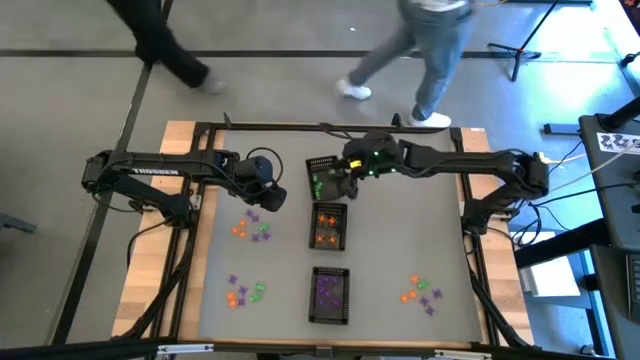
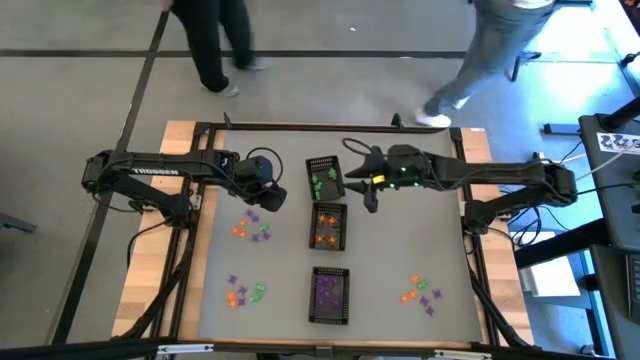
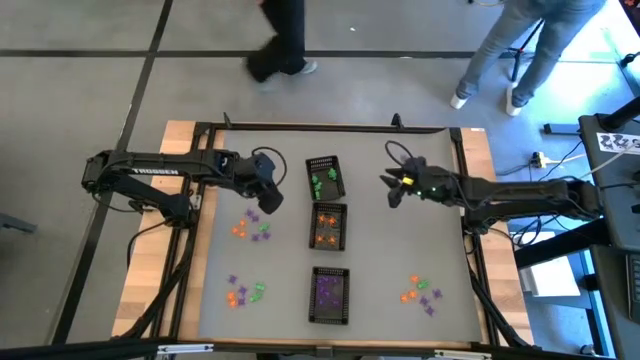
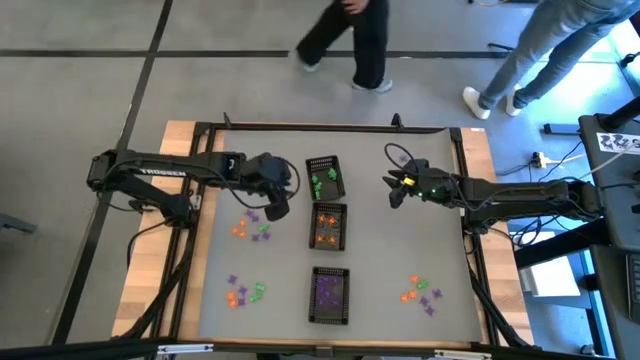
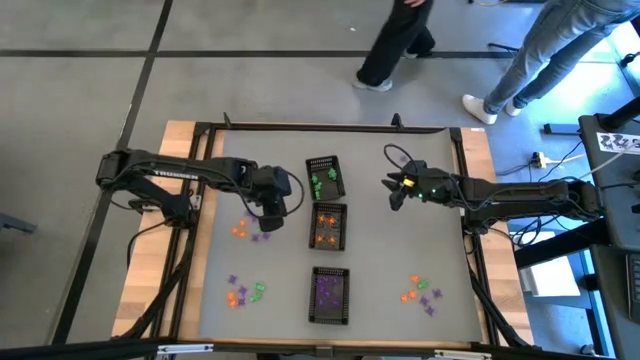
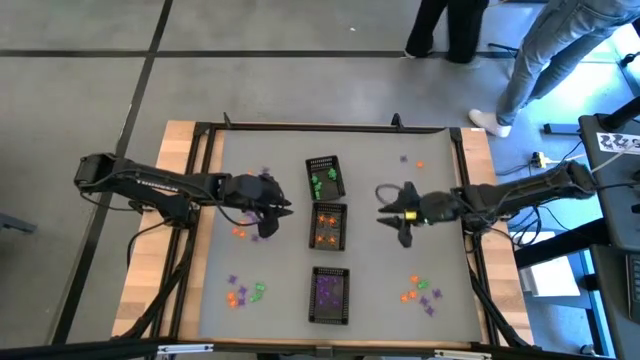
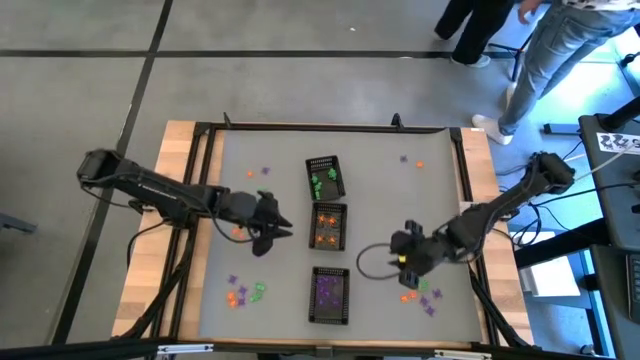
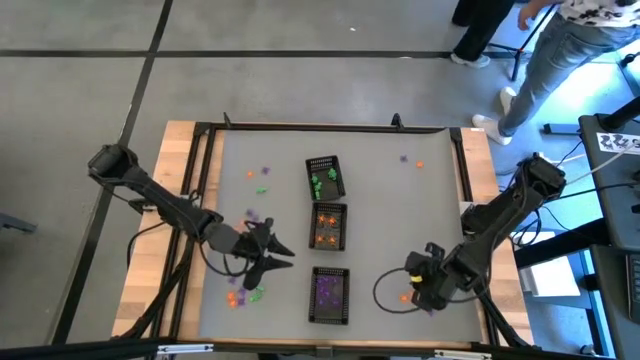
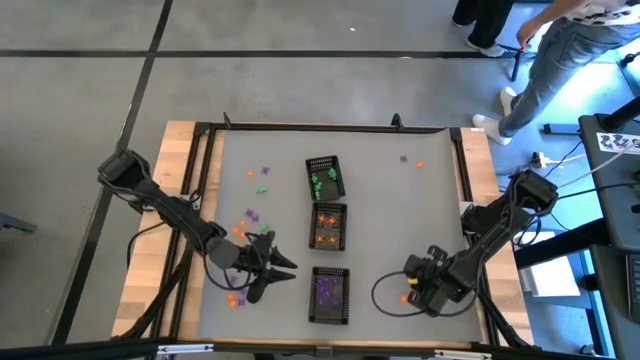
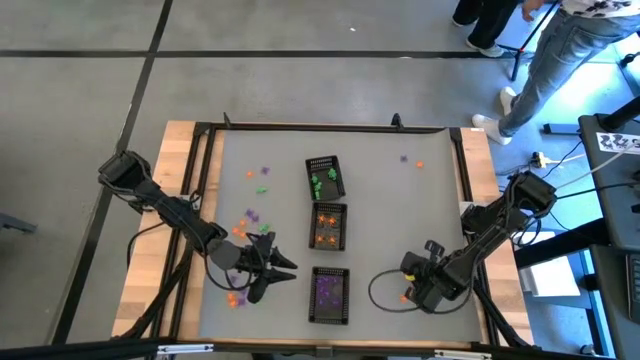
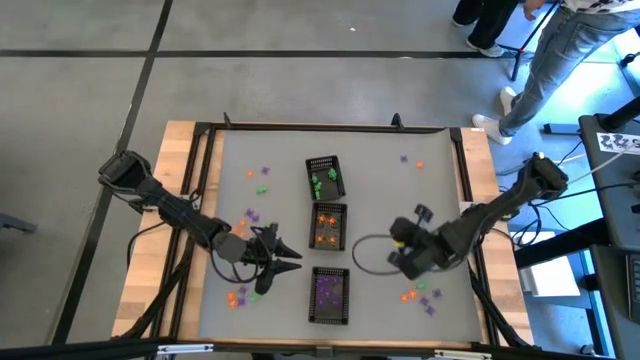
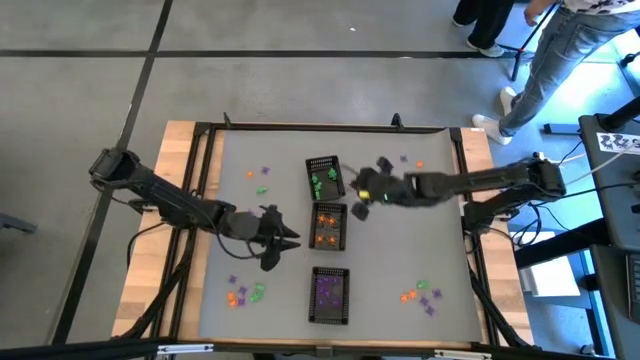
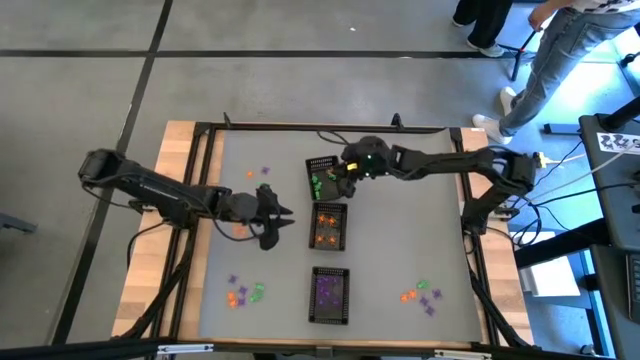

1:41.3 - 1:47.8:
Task: Sort Halloween decoration
Put the orange spider toy into the middle black bin

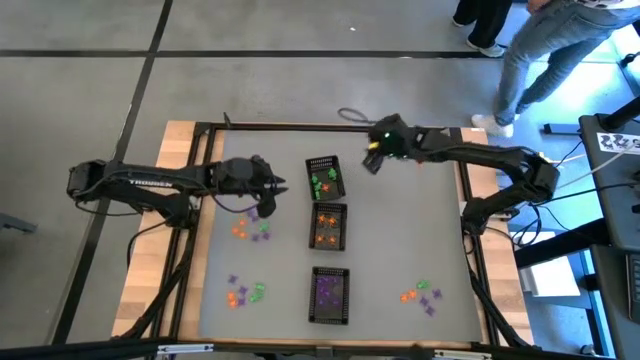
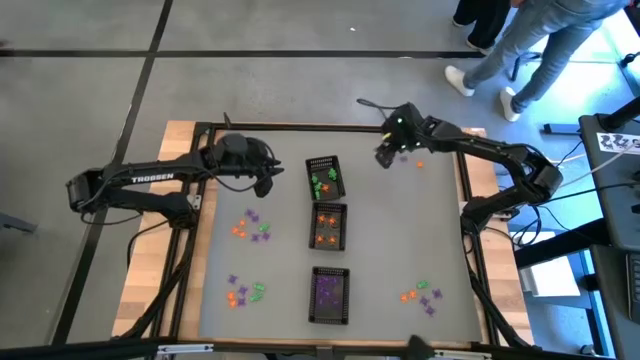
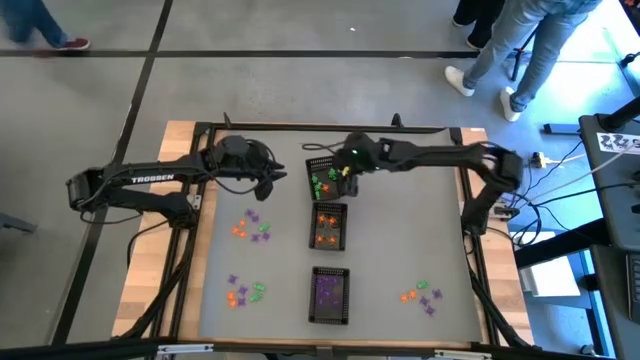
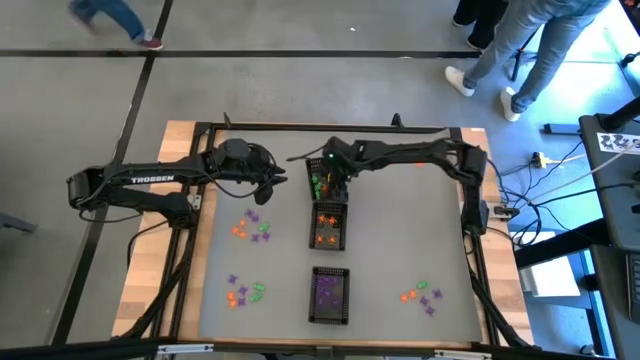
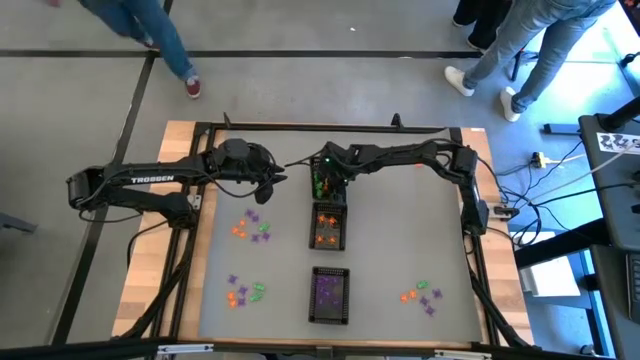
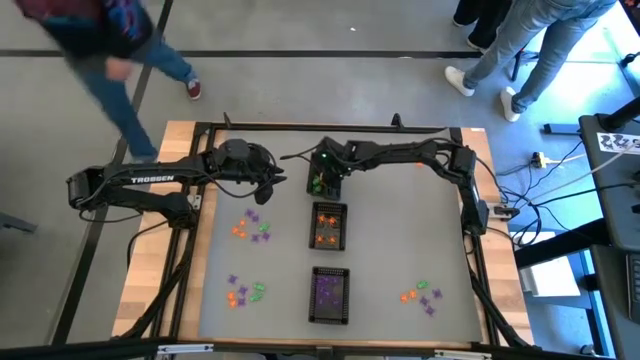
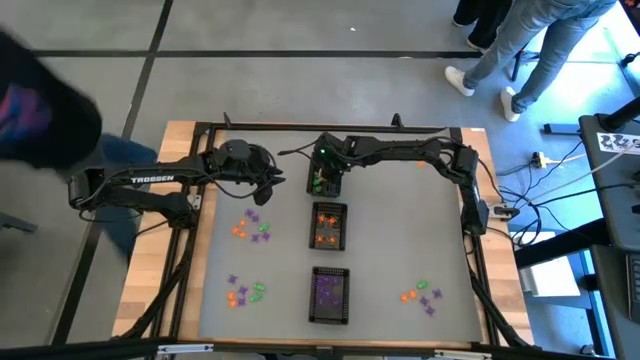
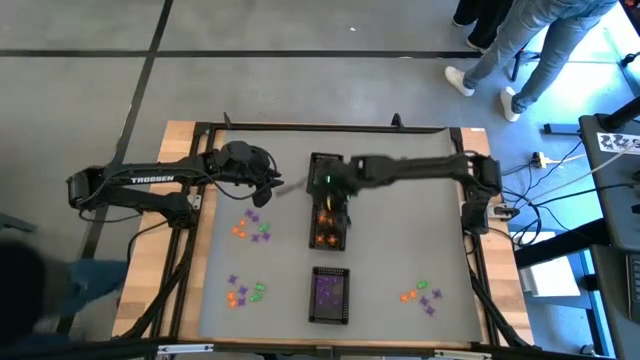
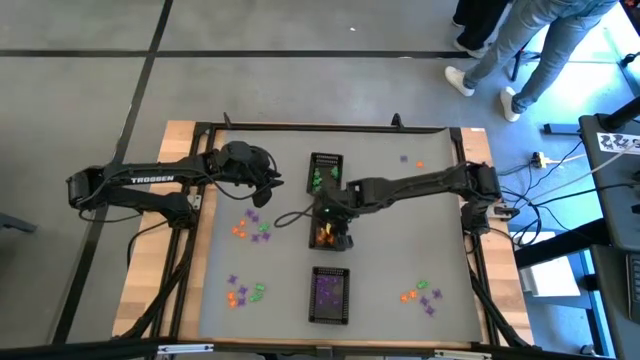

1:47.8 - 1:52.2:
Put the orange spider toy into the middle black bin

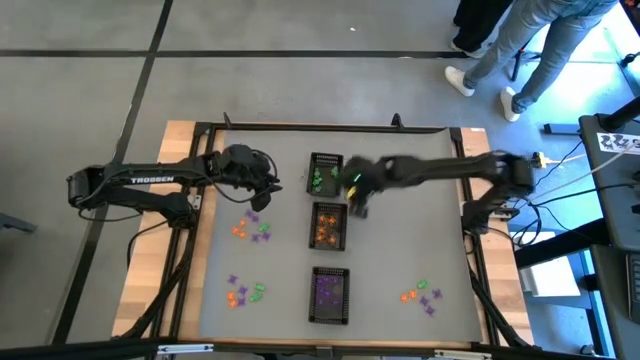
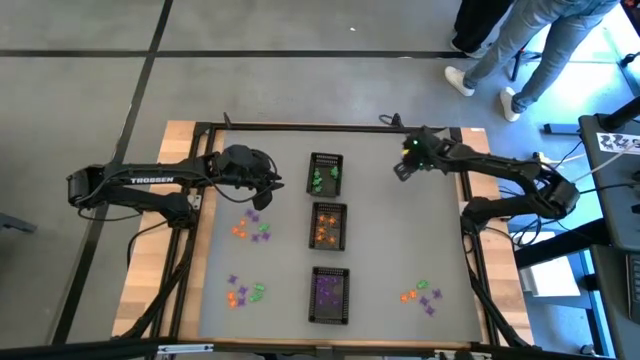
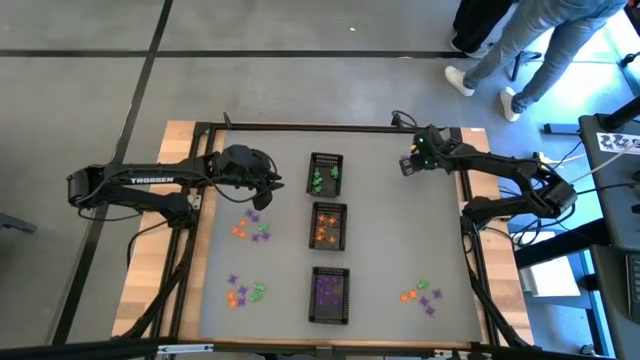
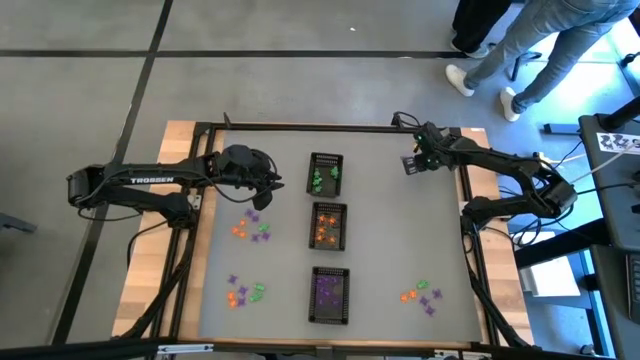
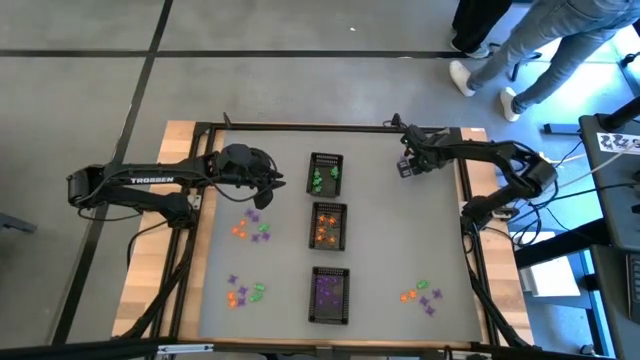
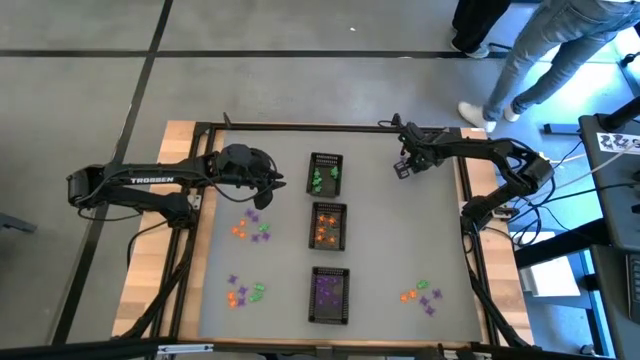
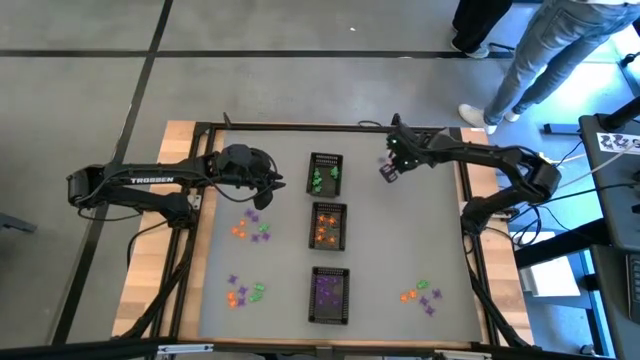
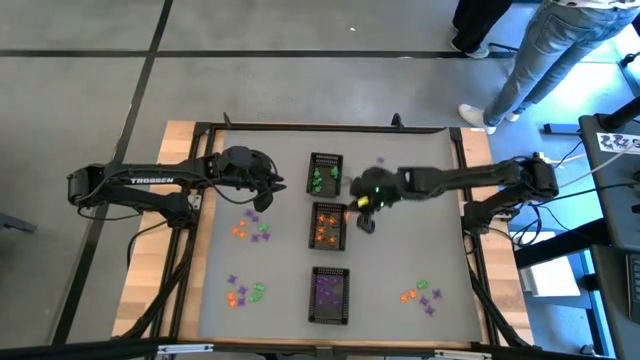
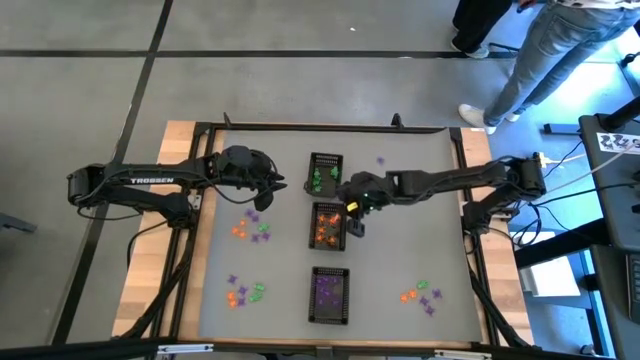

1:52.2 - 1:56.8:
Put the orange spider toy into the middle black bin

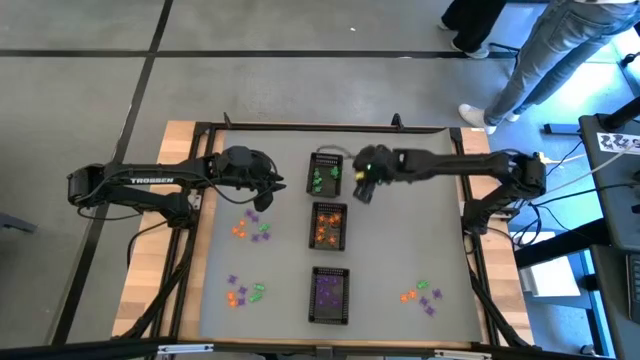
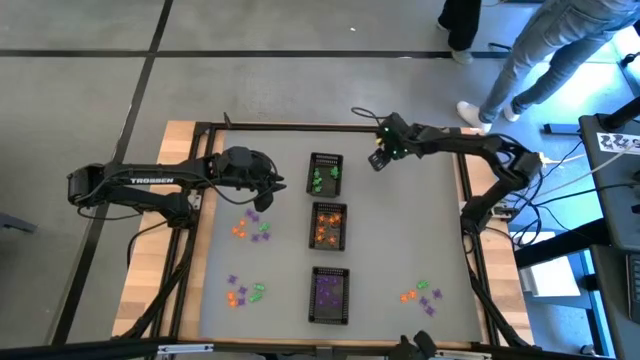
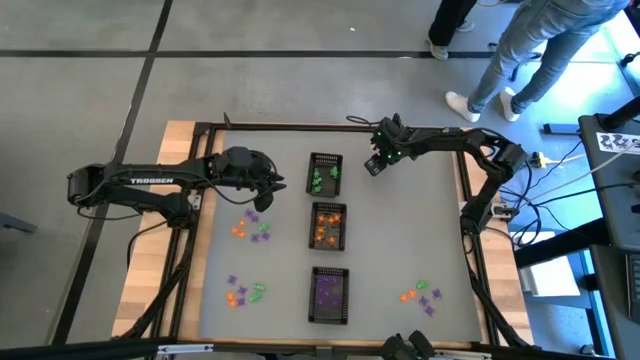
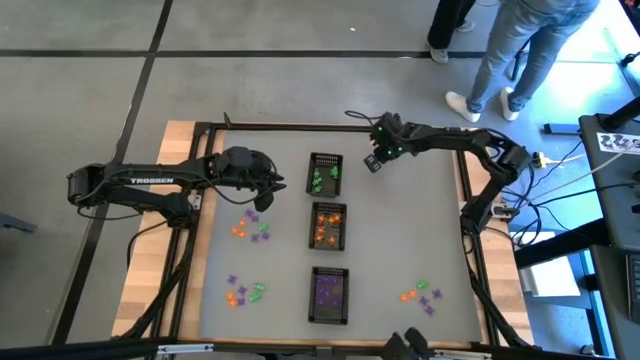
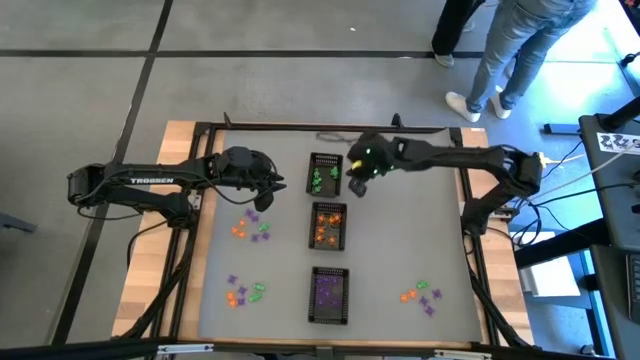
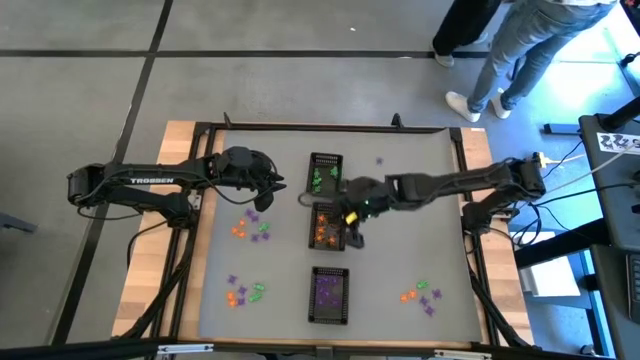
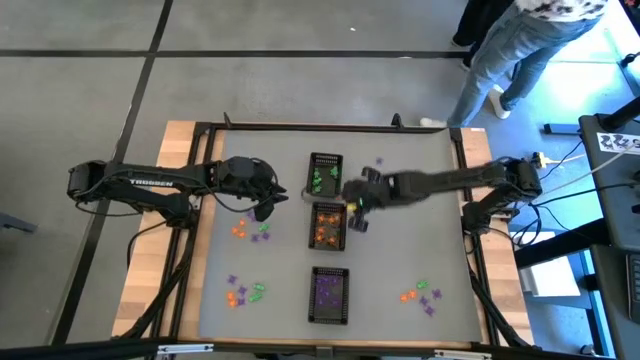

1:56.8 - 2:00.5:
Put the violet spider toy into the bottom black bin

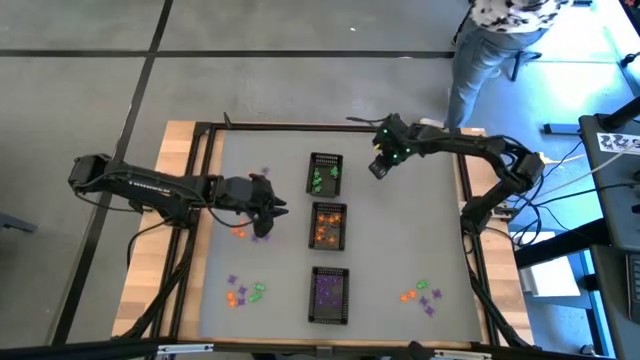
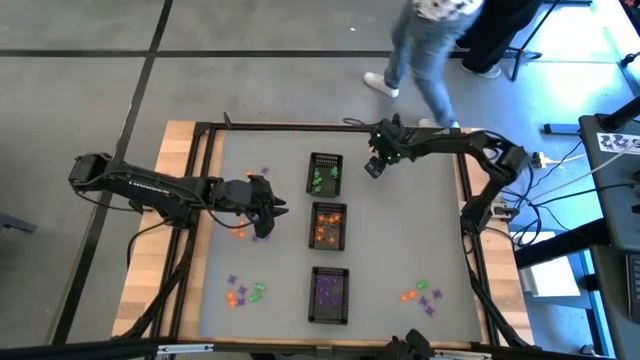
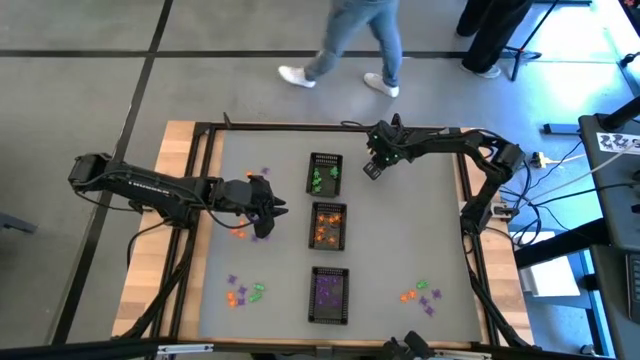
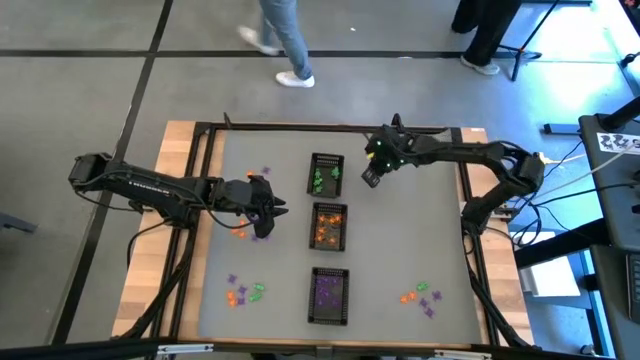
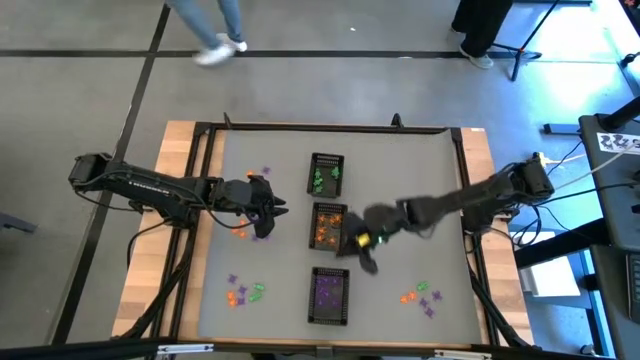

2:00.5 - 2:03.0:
Put the violet spider toy into the bottom black bin
